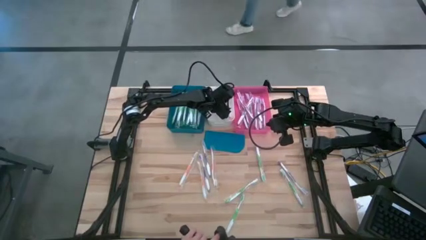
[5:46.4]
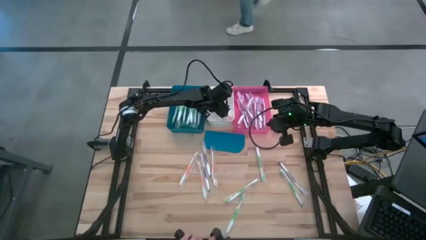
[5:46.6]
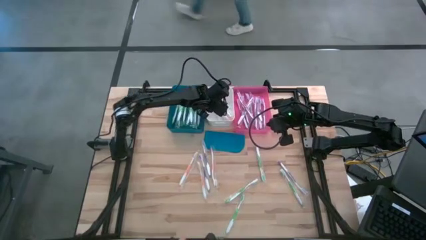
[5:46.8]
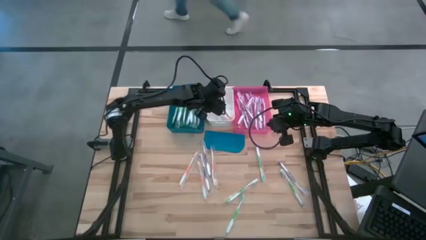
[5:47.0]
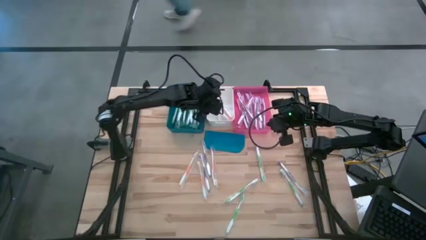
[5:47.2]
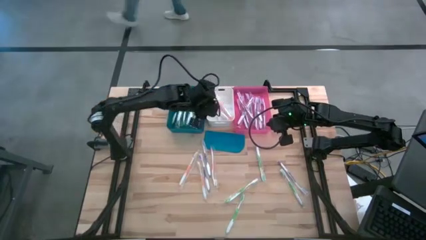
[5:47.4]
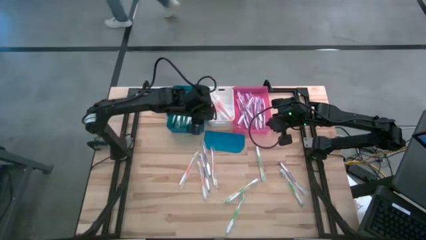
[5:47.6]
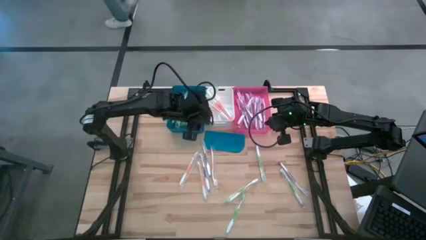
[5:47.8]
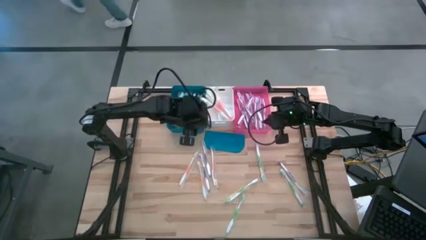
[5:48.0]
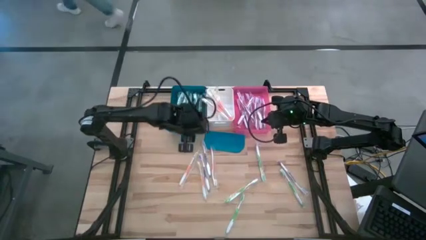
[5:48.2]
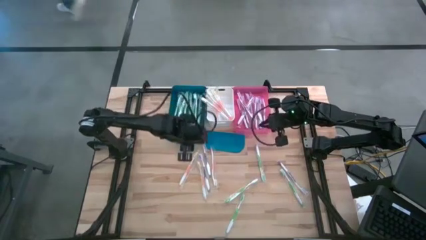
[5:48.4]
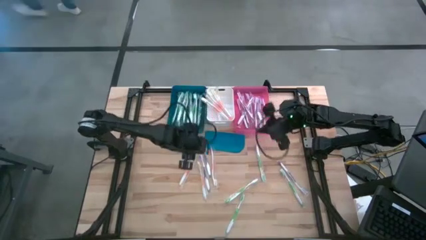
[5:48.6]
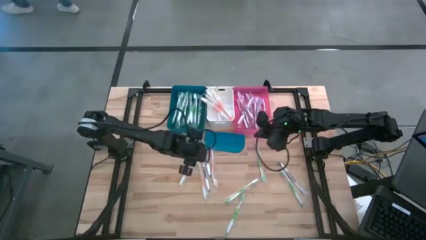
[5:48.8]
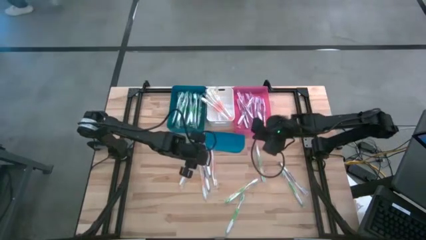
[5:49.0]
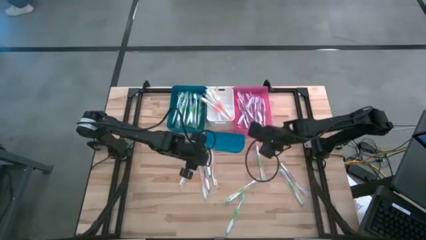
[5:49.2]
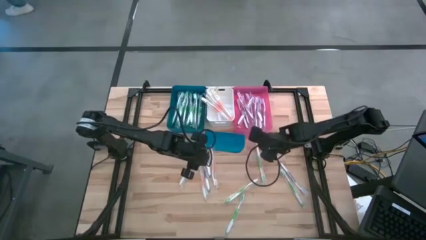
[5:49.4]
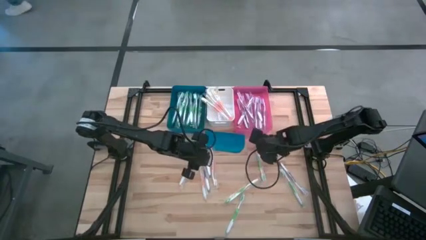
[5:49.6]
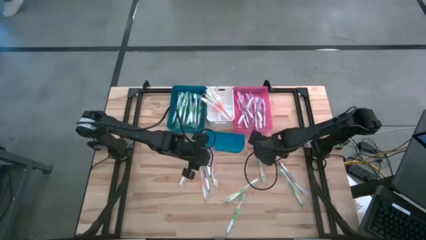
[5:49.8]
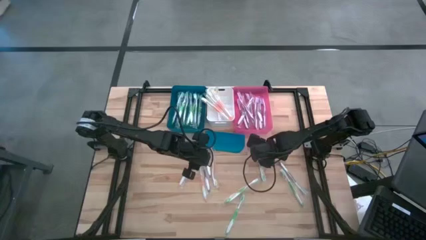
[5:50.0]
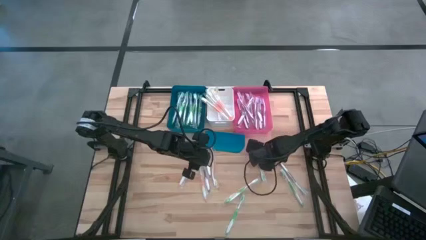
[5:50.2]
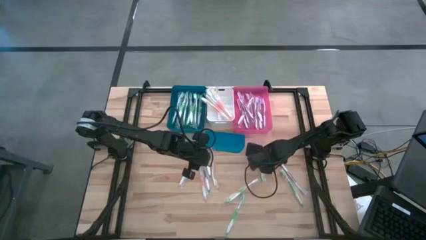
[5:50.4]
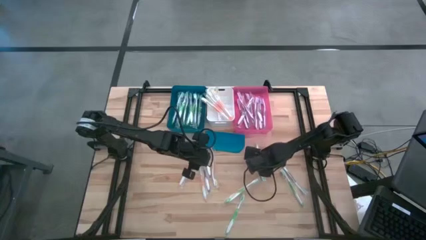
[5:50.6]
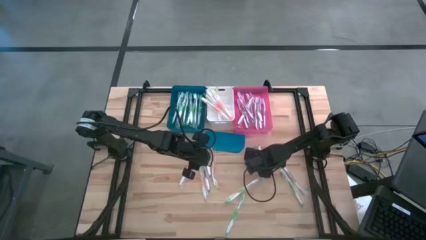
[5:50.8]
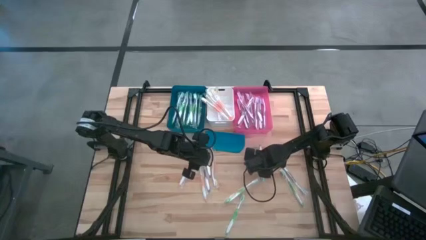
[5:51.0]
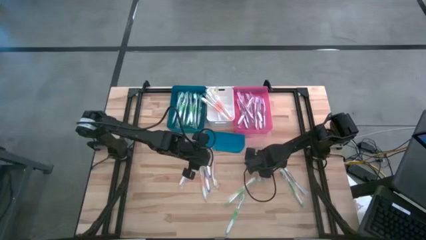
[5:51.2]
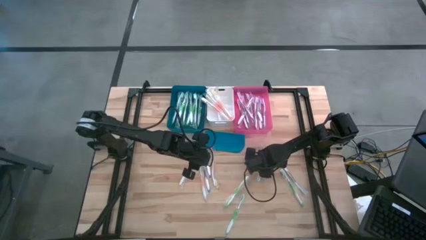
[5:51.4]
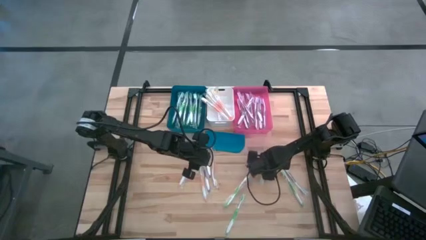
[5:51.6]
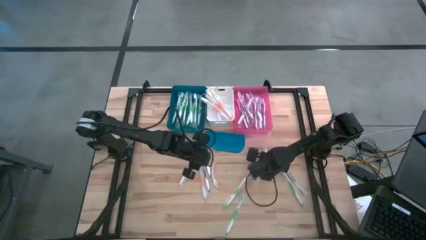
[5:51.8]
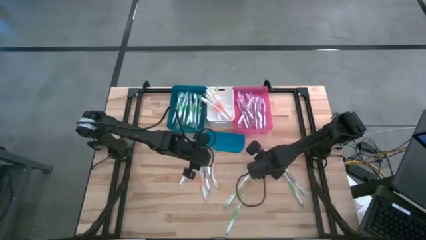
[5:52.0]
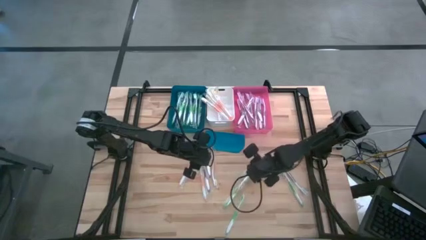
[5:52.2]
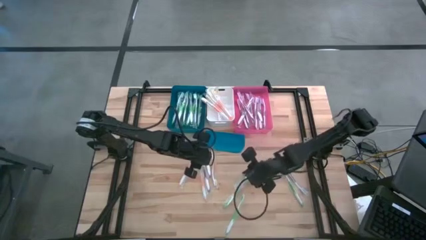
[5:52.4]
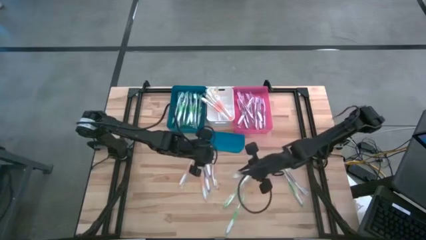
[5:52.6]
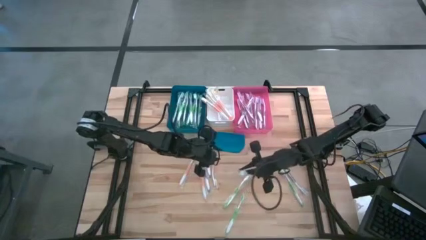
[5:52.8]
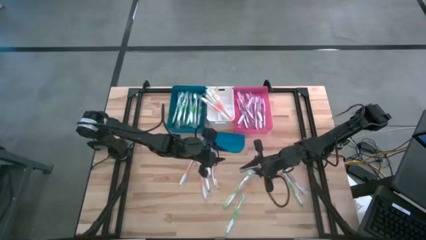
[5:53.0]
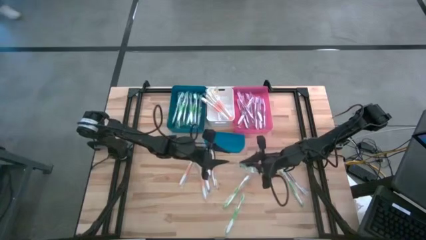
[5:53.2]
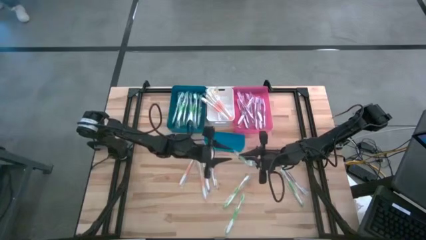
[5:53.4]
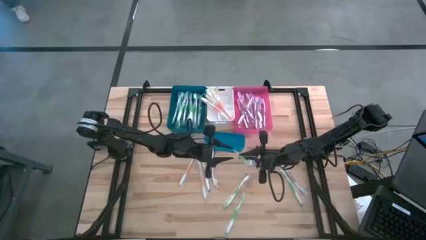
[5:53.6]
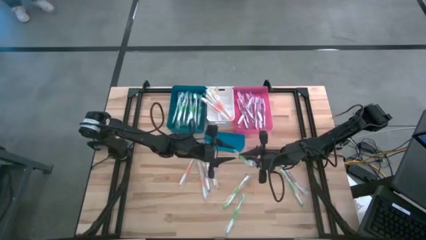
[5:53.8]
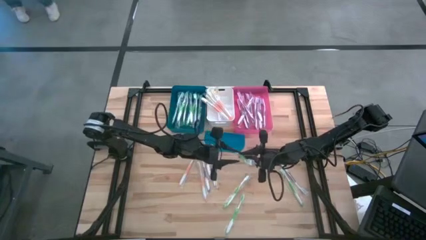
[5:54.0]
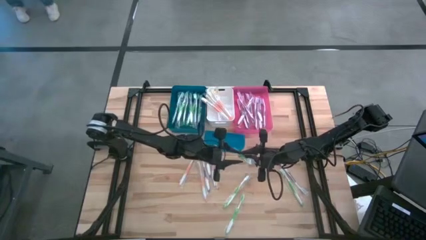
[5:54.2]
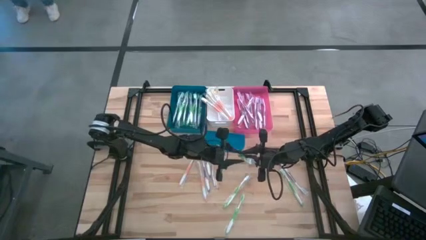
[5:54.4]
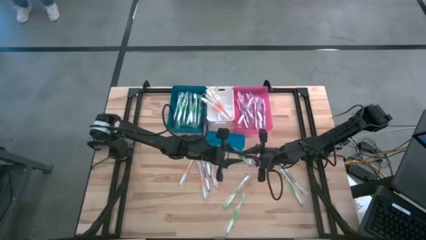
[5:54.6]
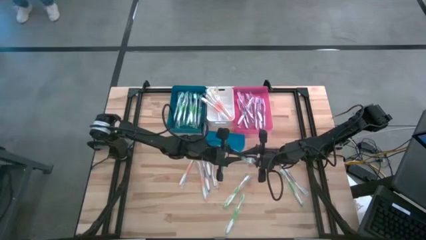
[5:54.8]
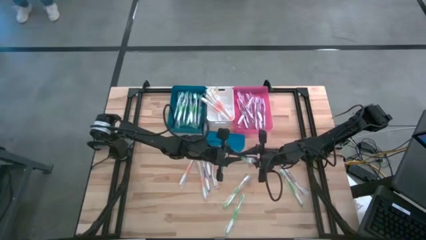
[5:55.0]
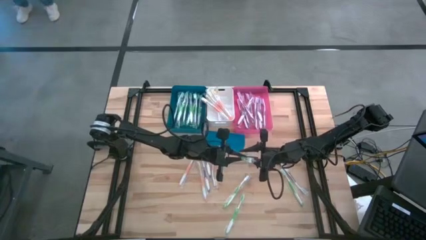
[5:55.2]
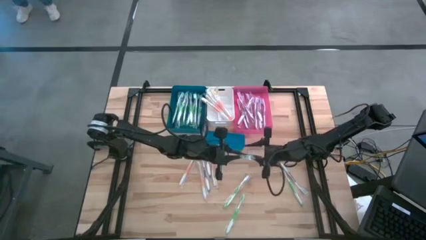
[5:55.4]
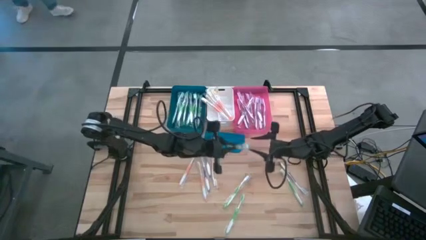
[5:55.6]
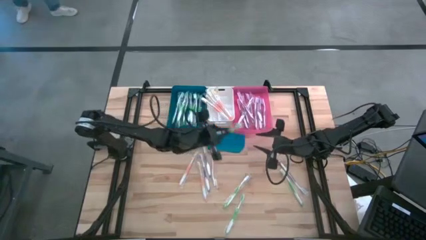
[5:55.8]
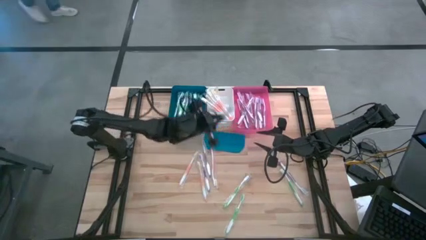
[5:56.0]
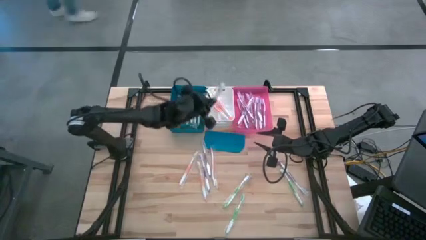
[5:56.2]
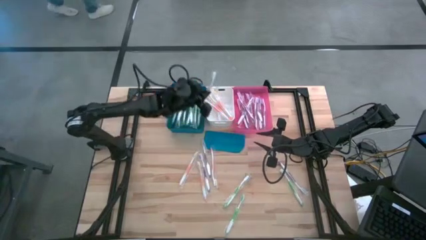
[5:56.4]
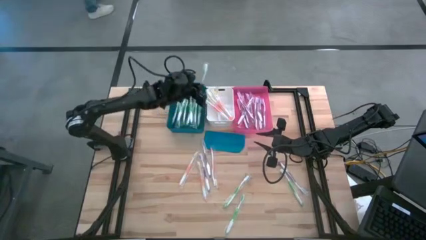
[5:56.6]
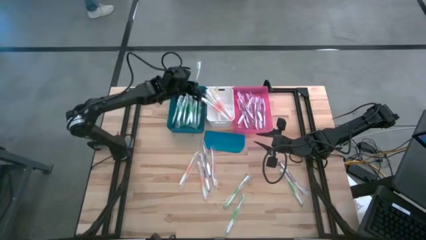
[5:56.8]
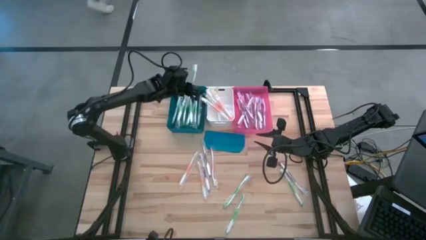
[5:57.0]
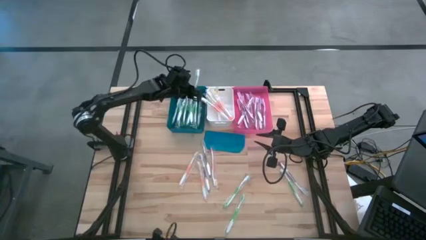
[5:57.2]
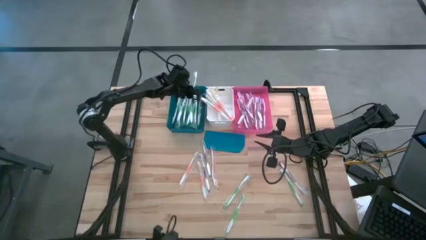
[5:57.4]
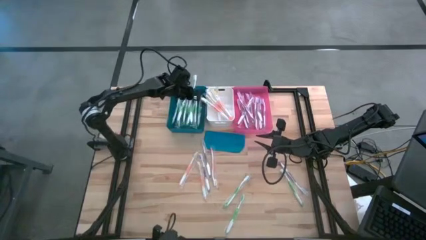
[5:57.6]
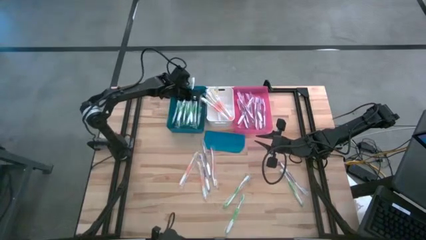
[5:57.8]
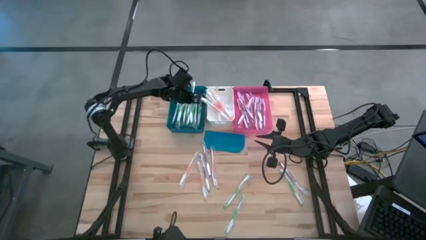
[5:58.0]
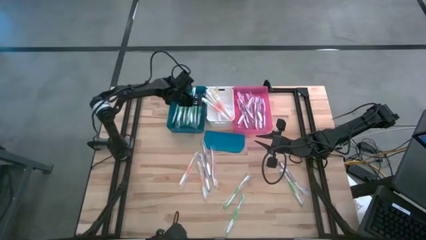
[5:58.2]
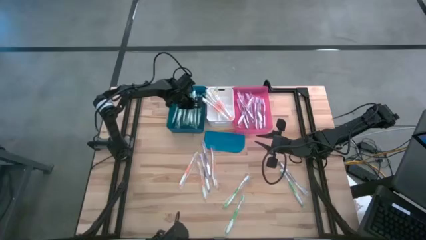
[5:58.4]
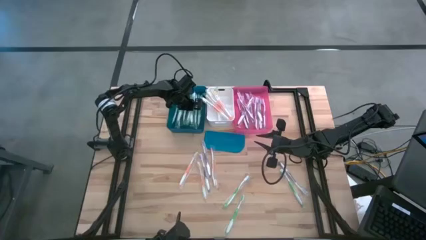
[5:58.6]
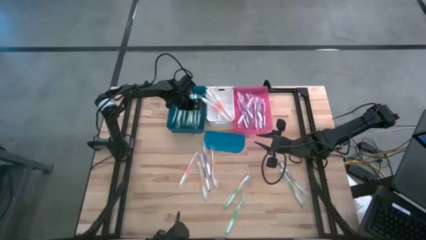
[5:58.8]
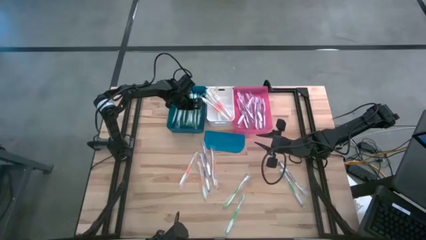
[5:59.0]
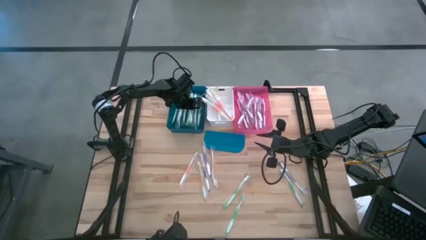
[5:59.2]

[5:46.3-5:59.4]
Task: Pick & Place Toothbrushes
Put the green toothbrush into the blue bin
